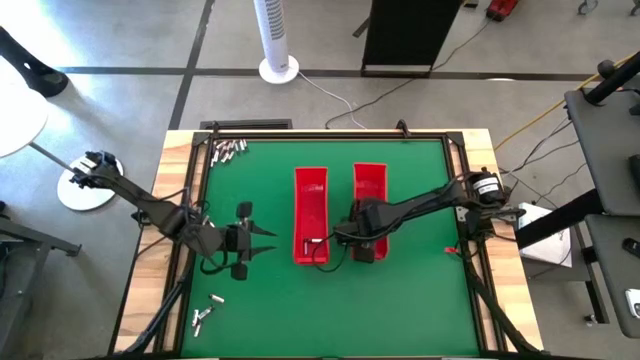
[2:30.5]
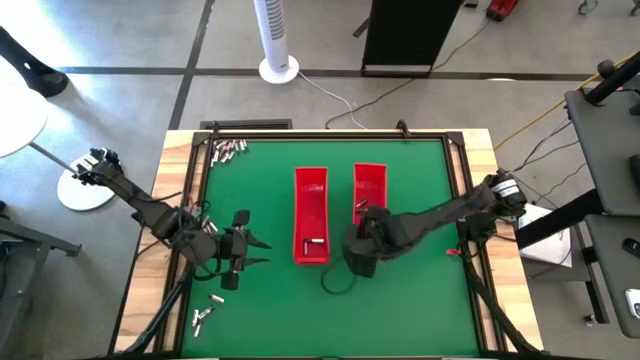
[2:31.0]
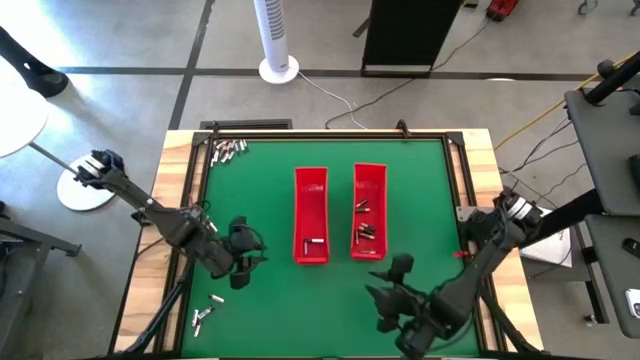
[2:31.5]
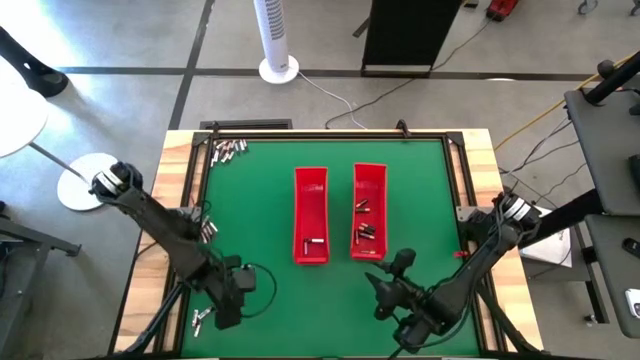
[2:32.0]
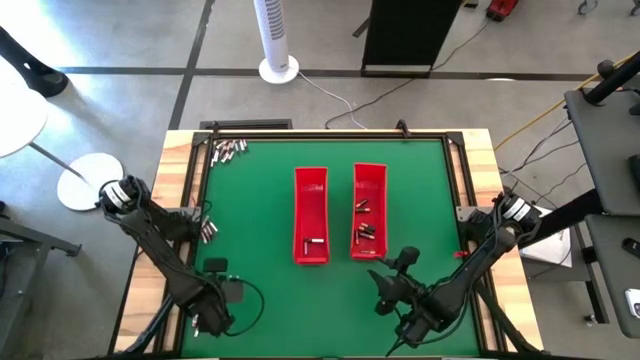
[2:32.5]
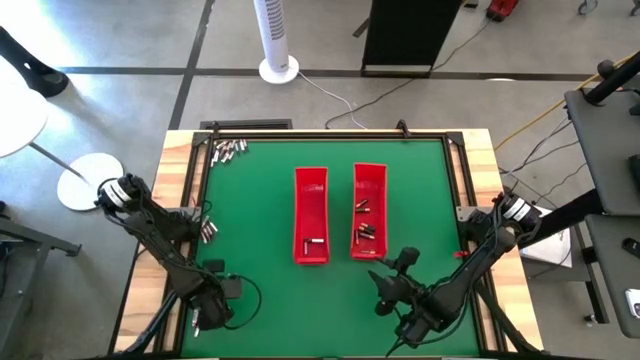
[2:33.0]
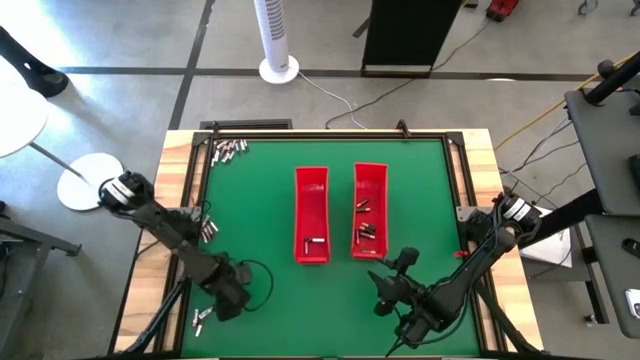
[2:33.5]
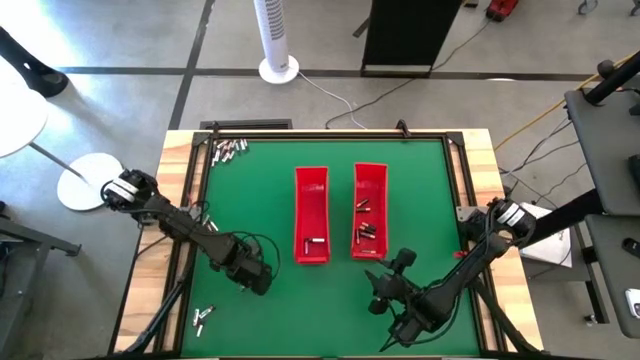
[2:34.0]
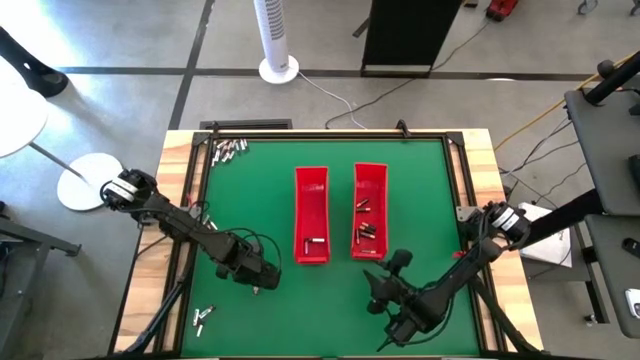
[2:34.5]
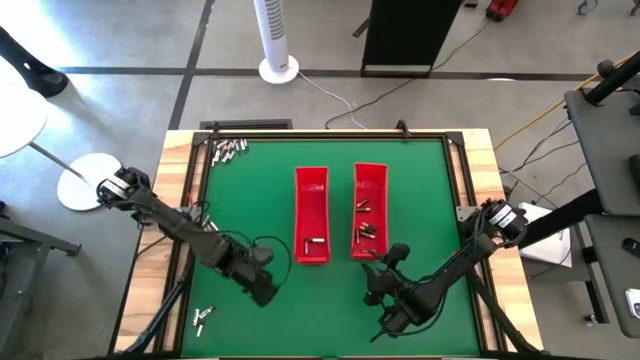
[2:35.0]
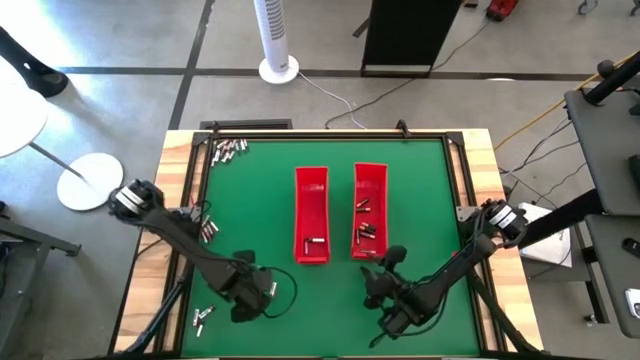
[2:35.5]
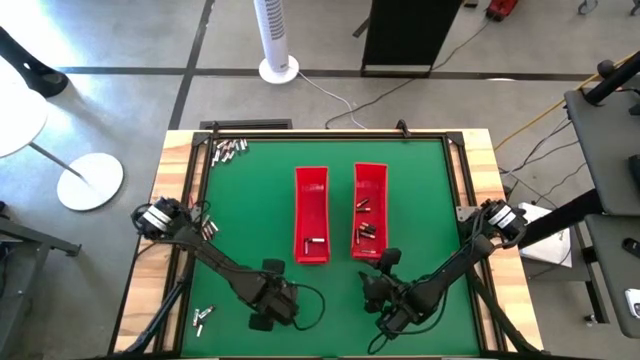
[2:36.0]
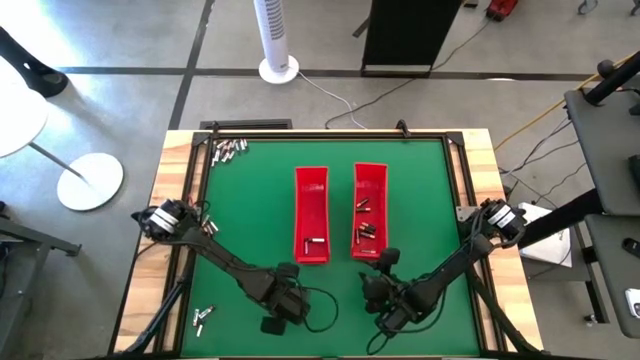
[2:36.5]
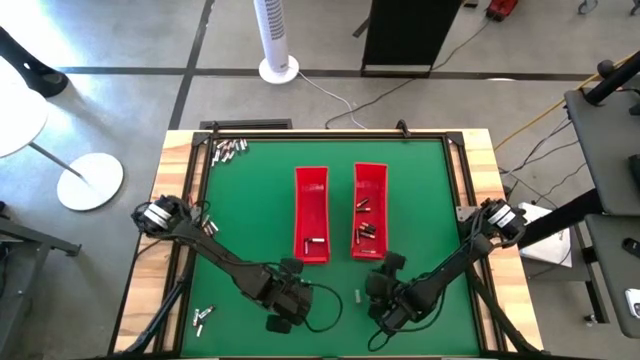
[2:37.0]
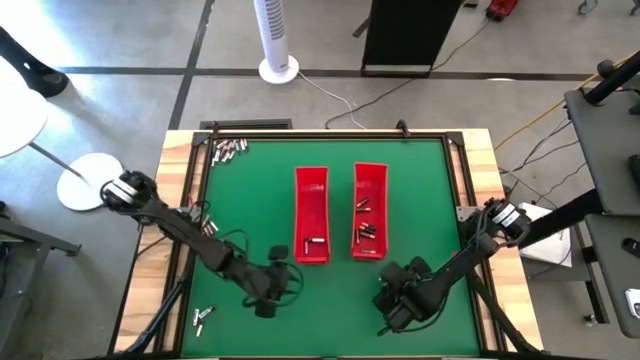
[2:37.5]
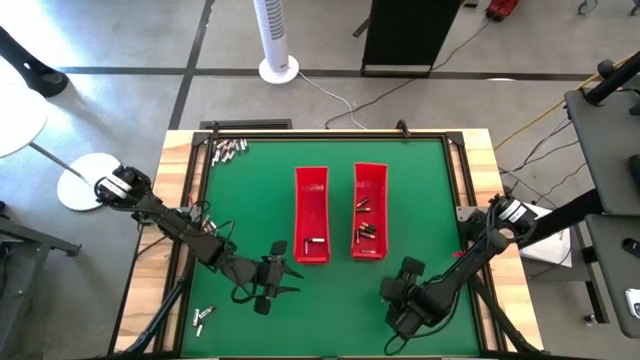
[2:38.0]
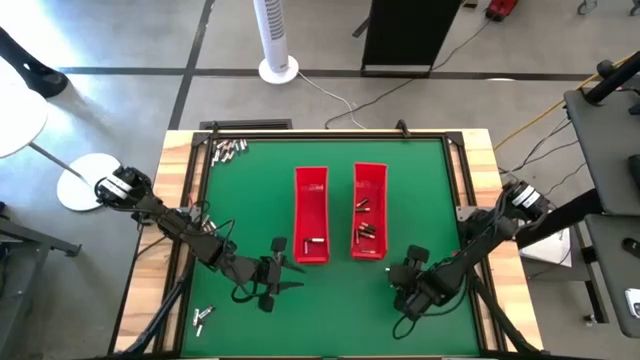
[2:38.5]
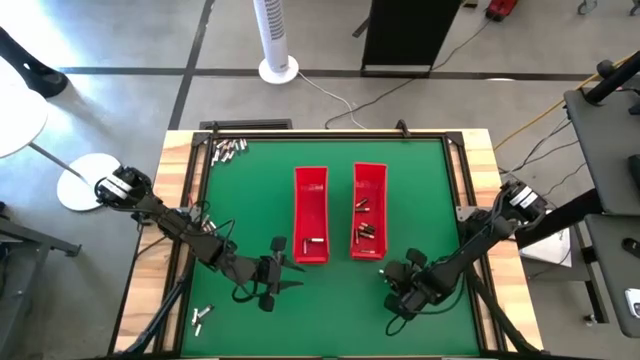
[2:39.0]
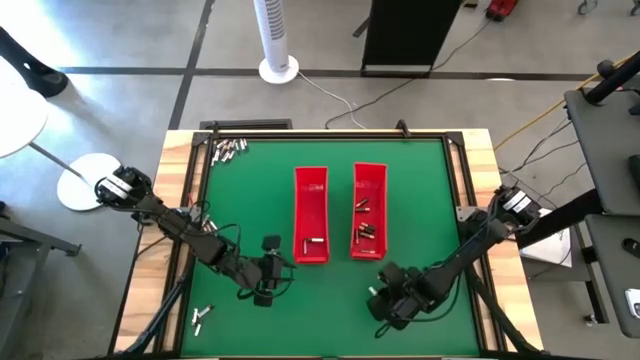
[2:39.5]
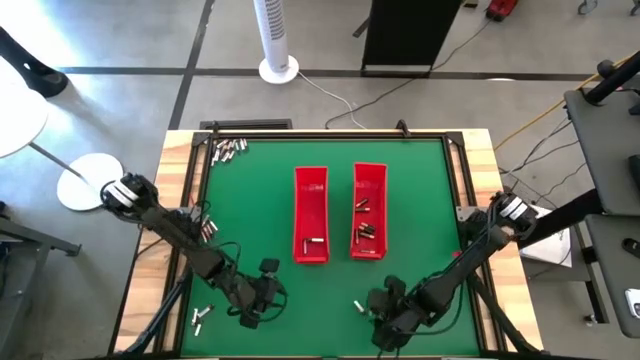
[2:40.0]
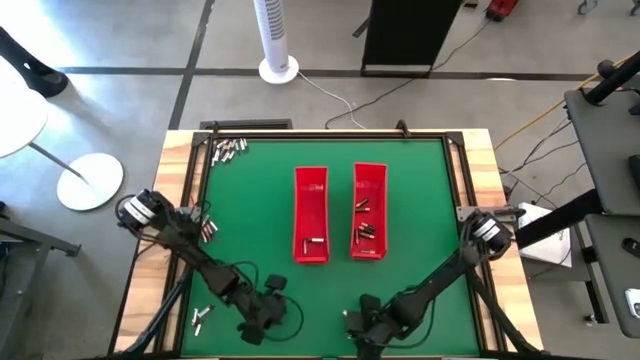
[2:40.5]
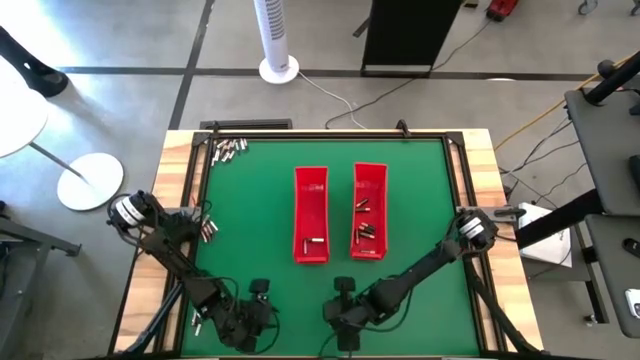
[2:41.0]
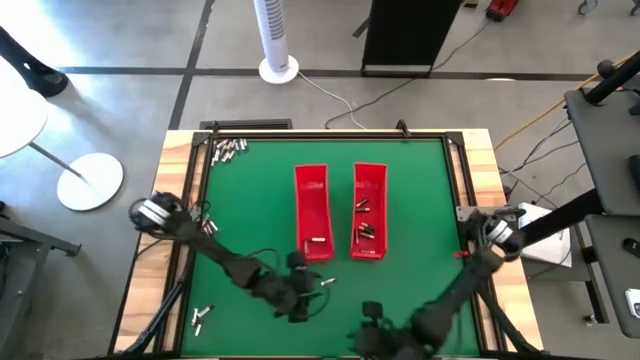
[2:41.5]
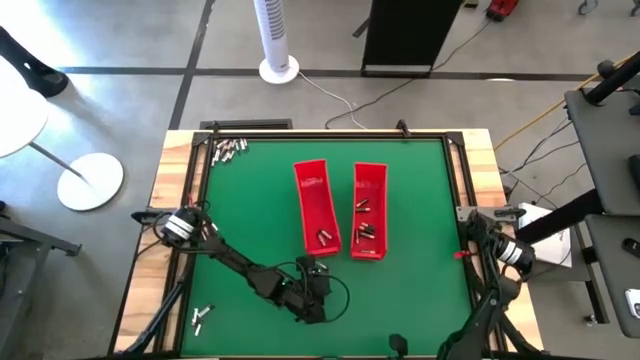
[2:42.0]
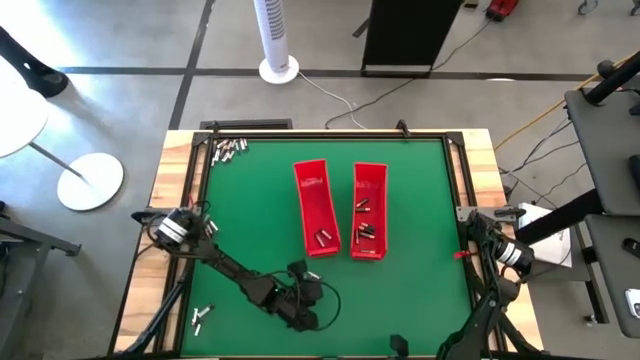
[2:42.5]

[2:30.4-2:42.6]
Task: Sort batteries
Put the silver battery into the left red bin

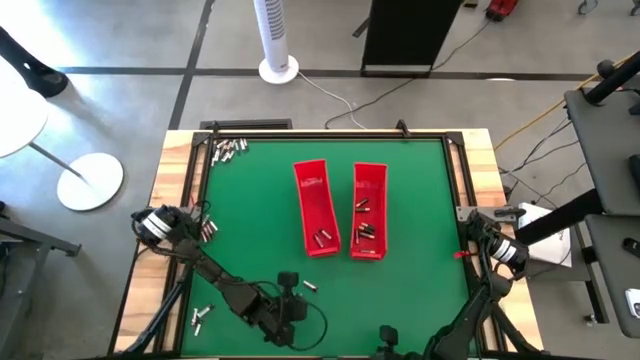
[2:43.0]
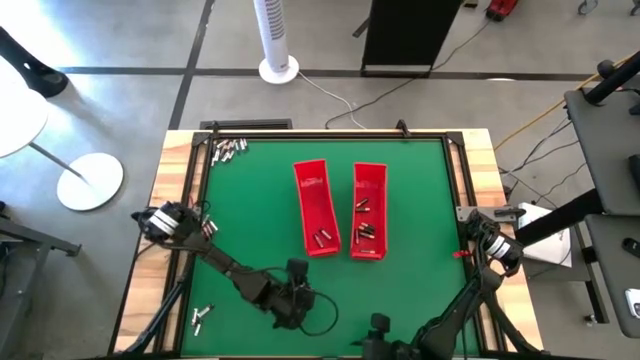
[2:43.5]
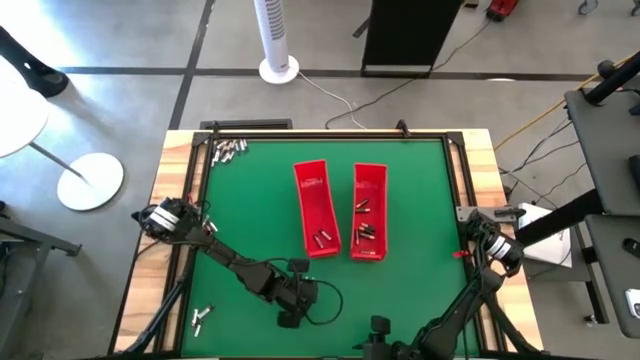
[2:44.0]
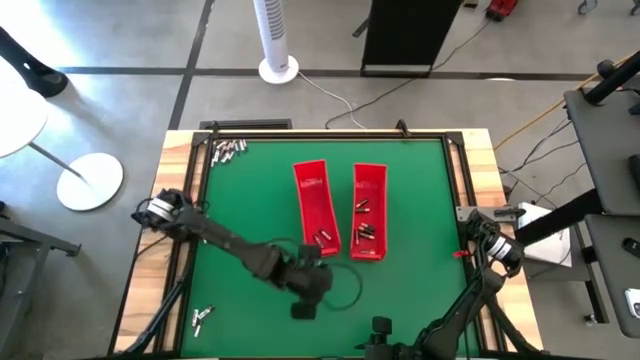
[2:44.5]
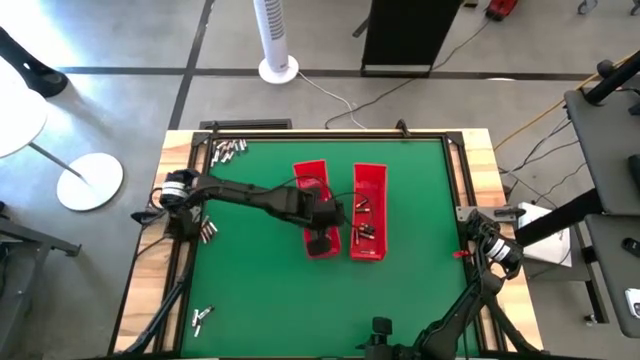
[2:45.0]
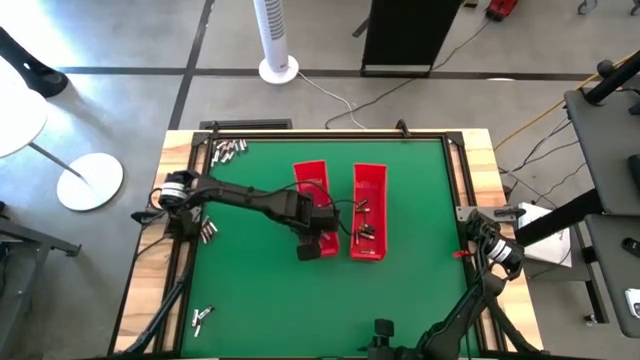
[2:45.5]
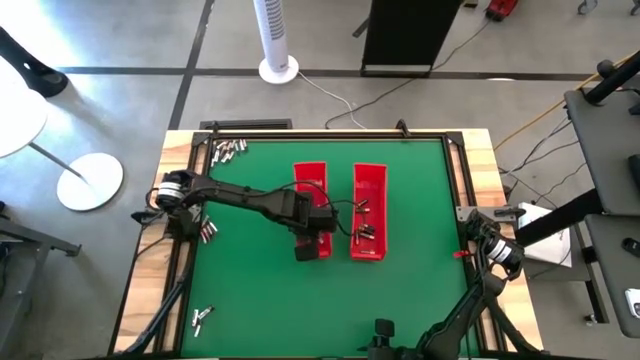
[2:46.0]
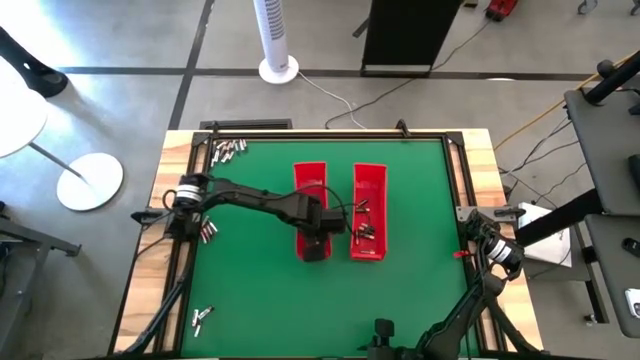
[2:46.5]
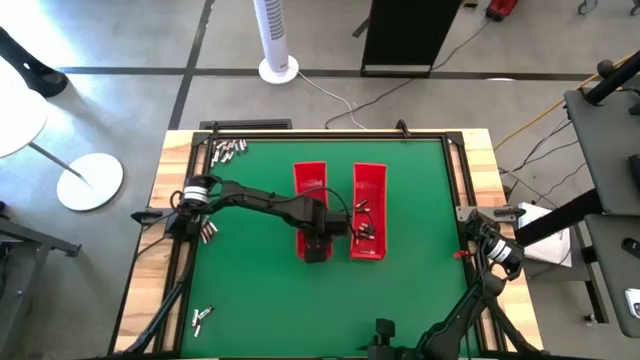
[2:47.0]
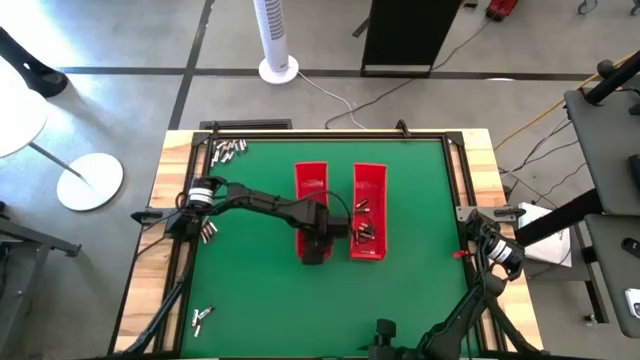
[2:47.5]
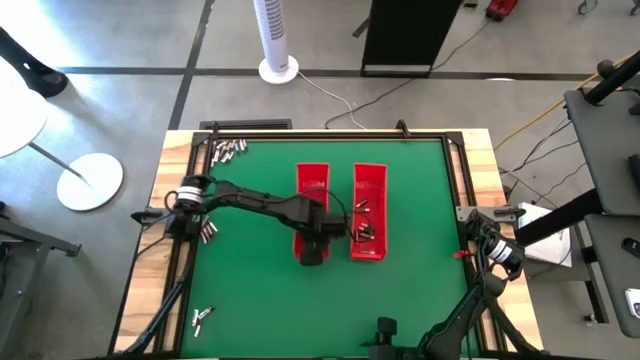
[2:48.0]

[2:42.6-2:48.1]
Put the silver battery into the left red bin

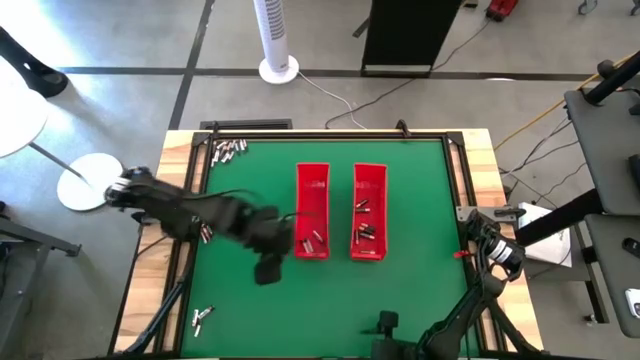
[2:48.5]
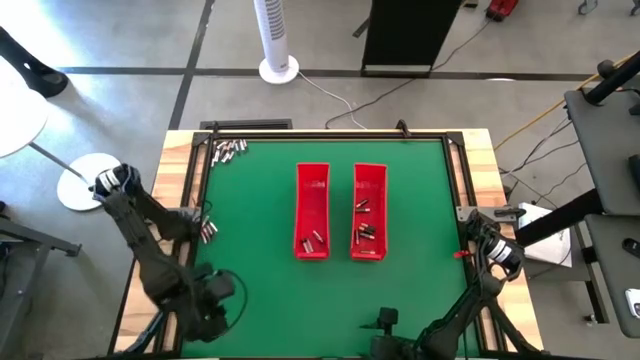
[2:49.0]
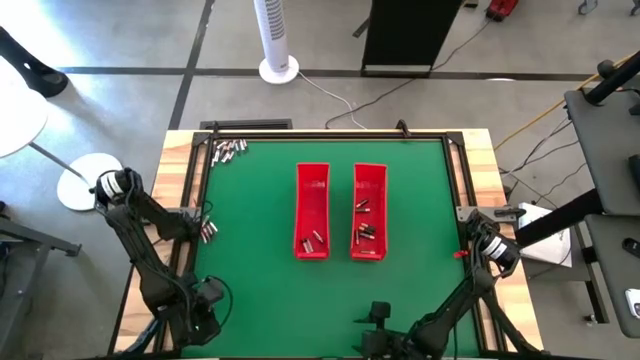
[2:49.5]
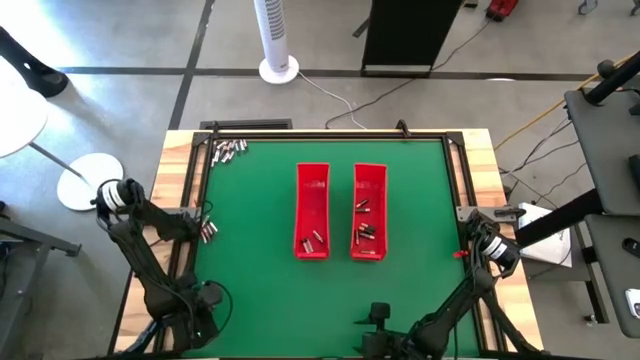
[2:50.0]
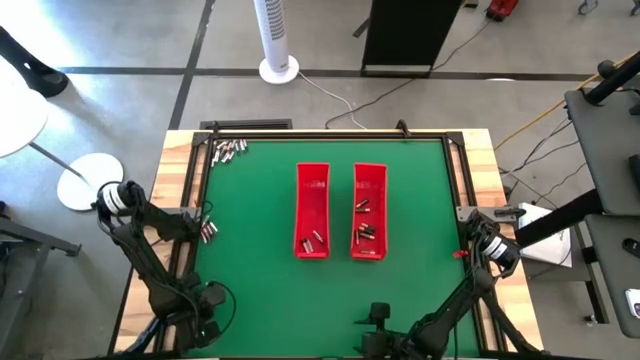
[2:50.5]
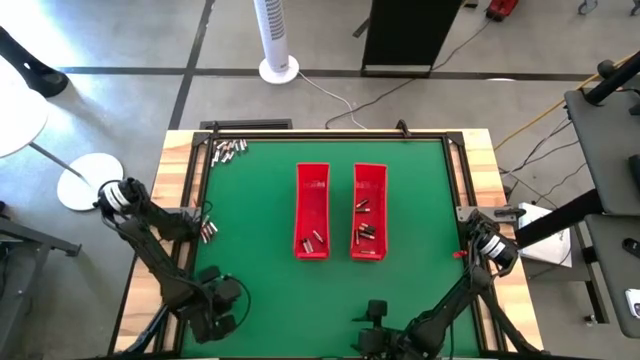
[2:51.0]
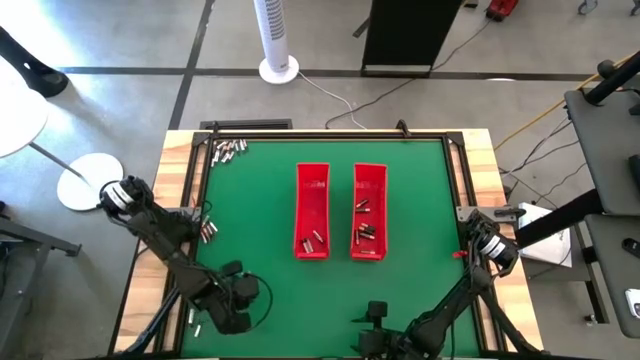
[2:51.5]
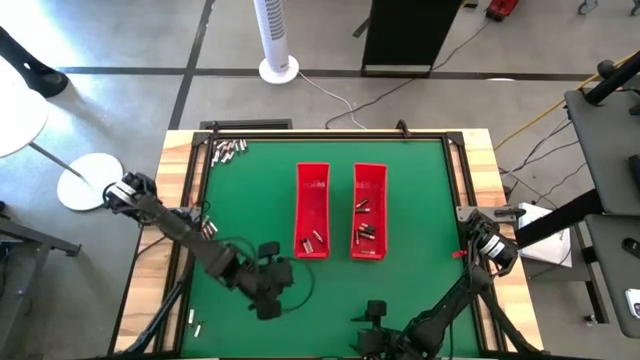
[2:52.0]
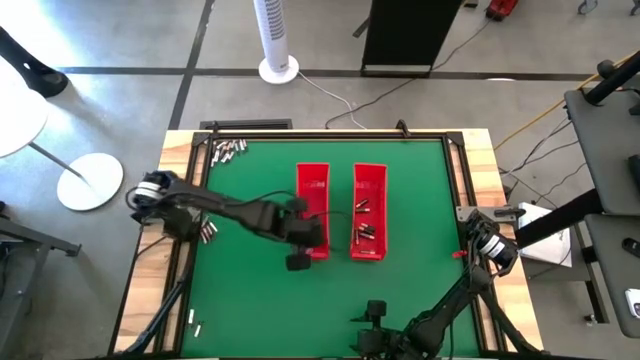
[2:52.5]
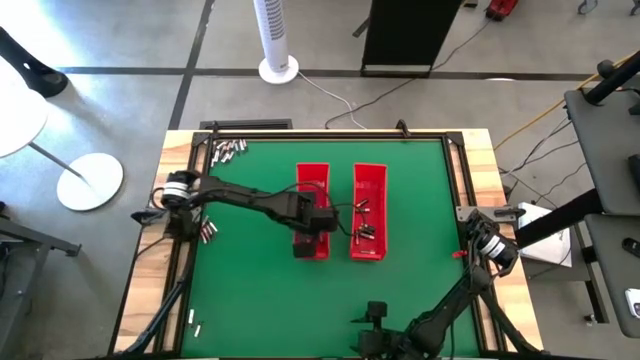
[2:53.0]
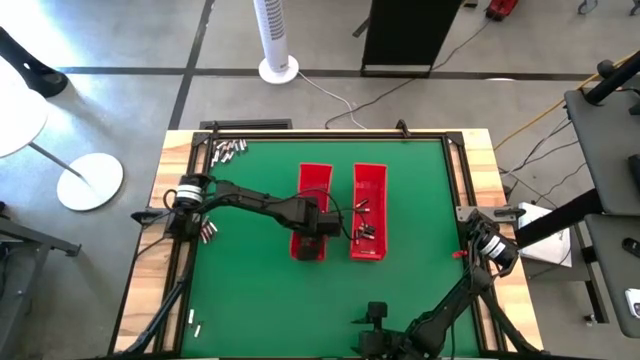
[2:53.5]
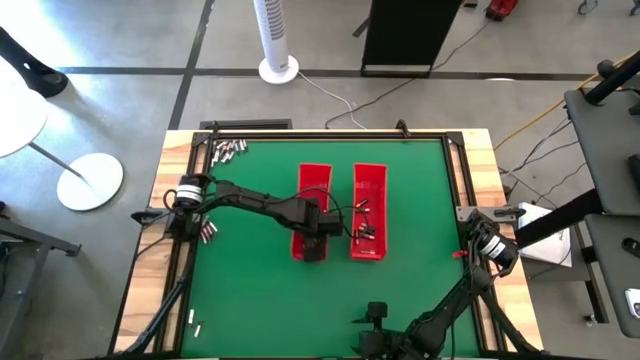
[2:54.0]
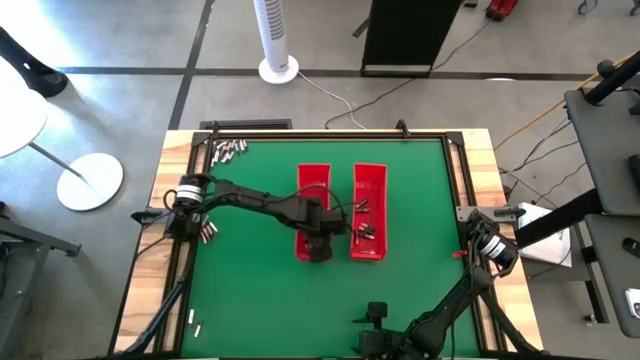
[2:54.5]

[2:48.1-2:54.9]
Put the silver battery into the left red bin
